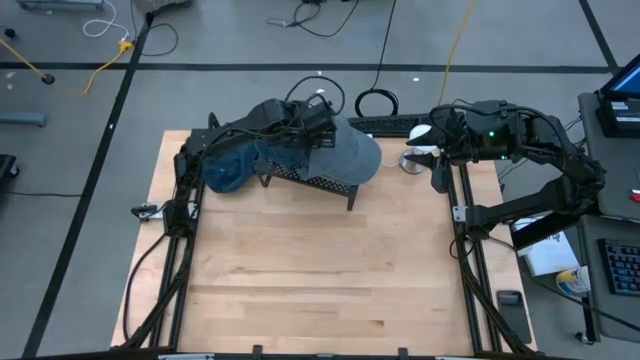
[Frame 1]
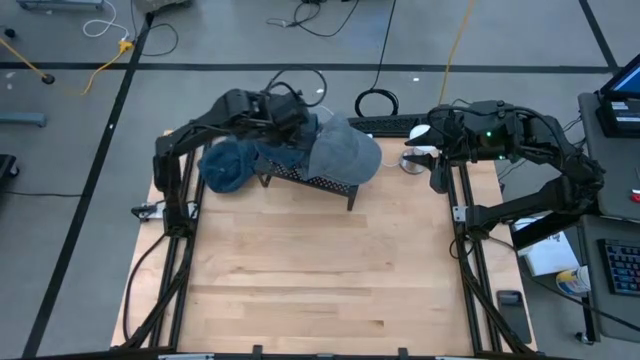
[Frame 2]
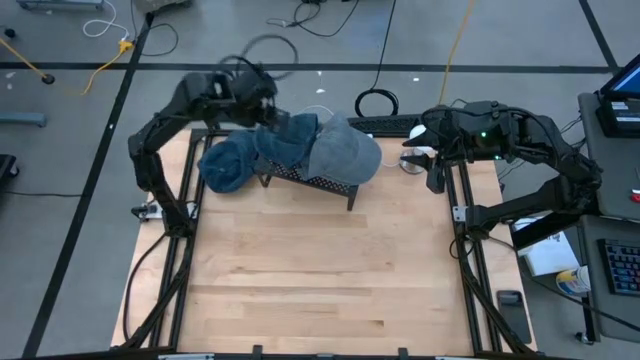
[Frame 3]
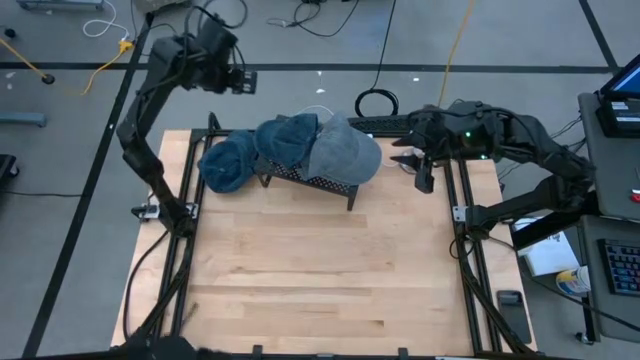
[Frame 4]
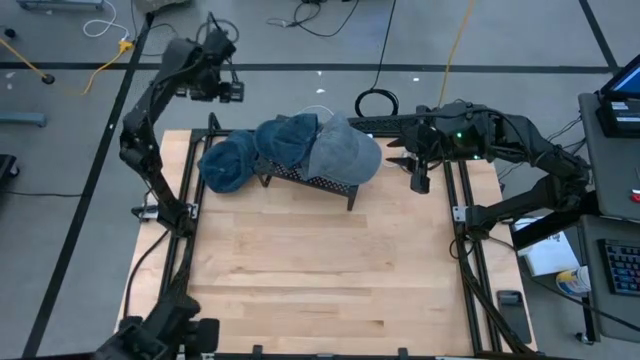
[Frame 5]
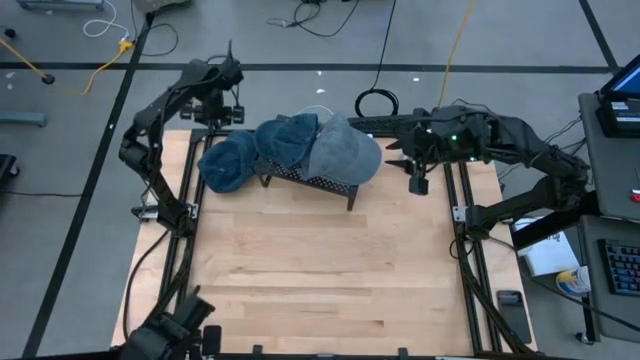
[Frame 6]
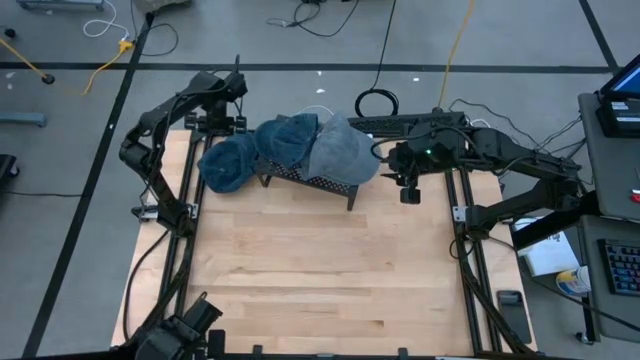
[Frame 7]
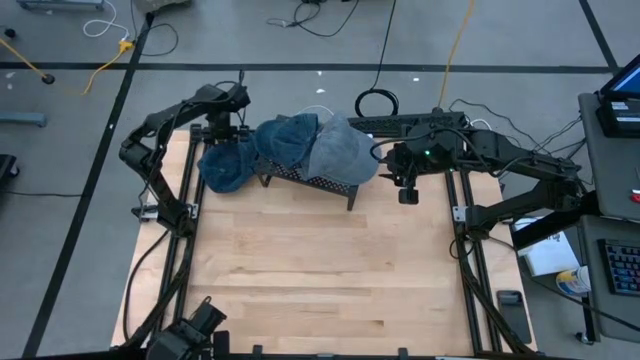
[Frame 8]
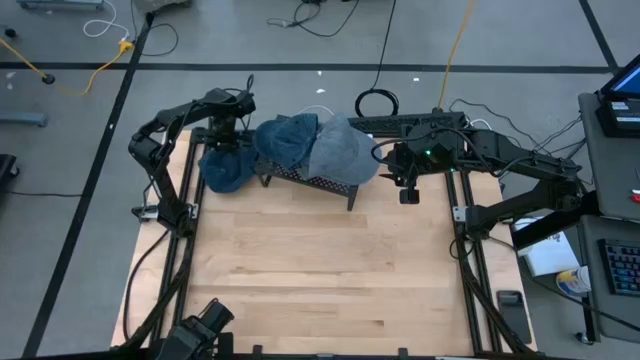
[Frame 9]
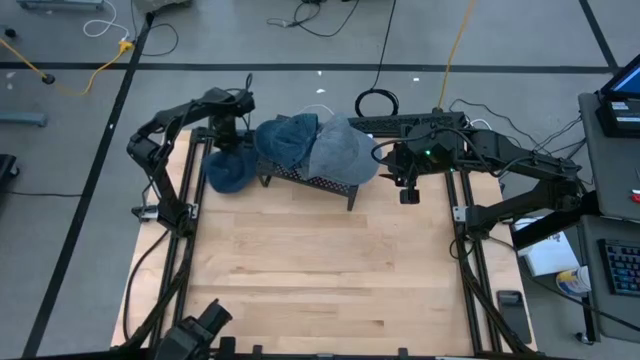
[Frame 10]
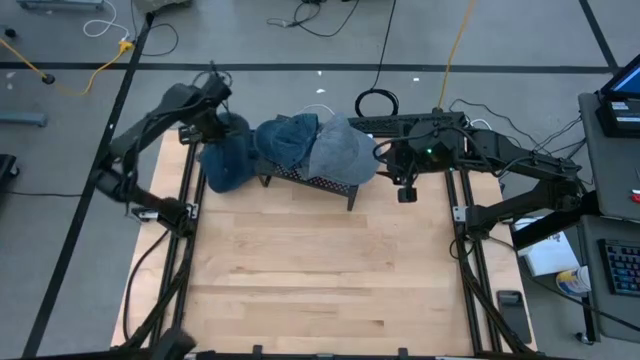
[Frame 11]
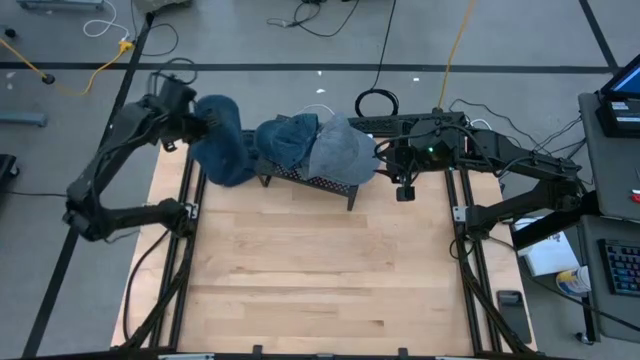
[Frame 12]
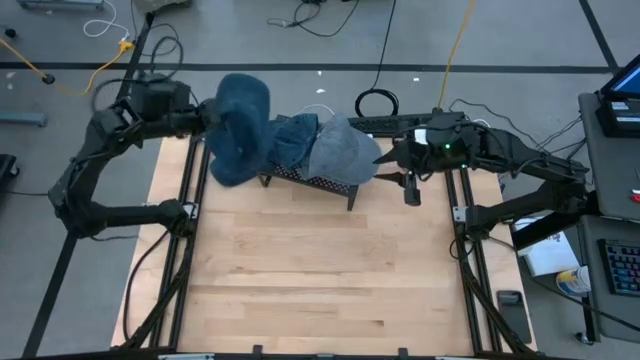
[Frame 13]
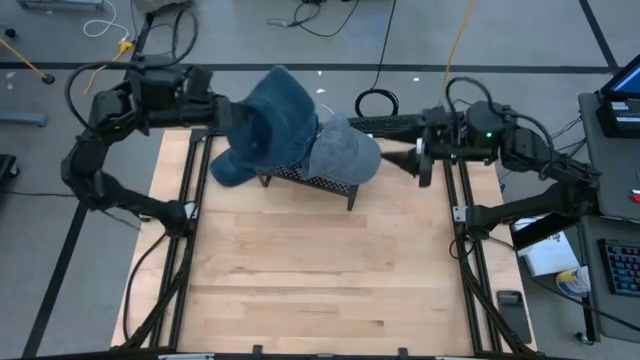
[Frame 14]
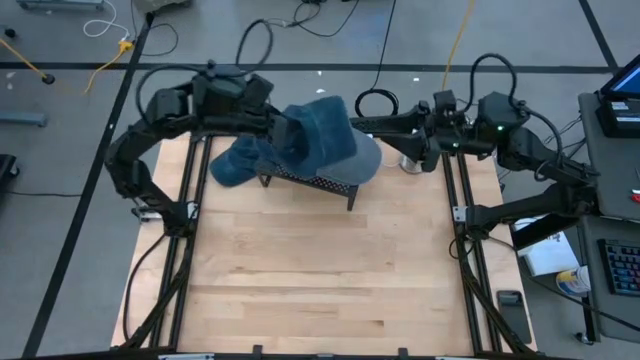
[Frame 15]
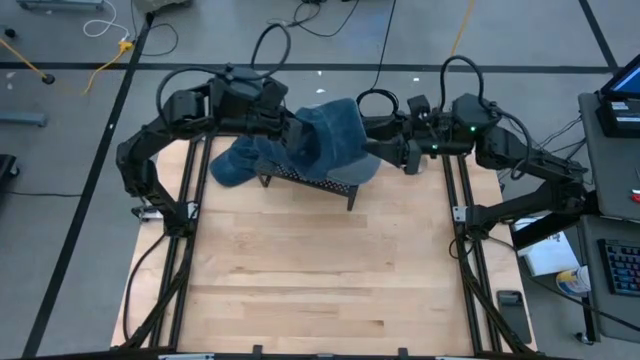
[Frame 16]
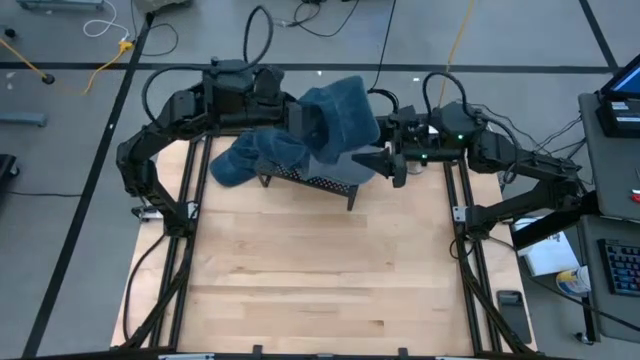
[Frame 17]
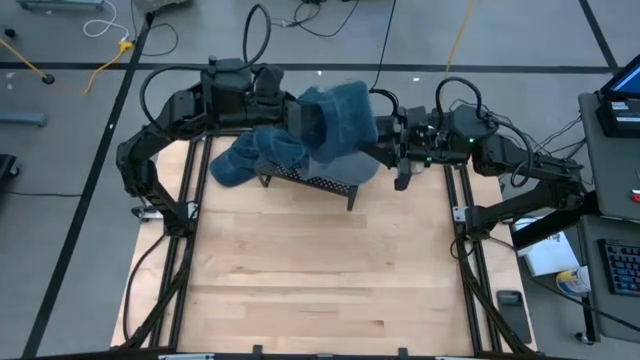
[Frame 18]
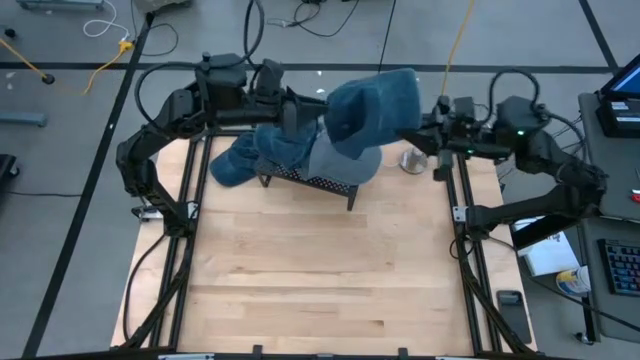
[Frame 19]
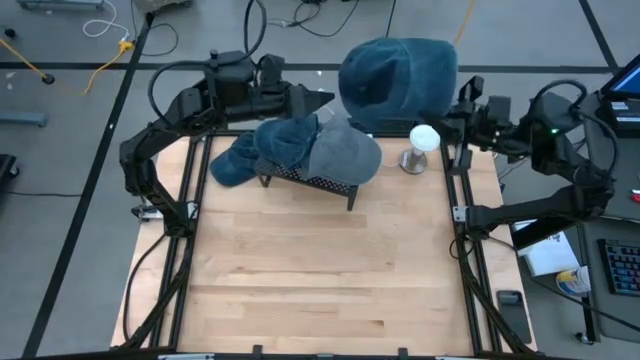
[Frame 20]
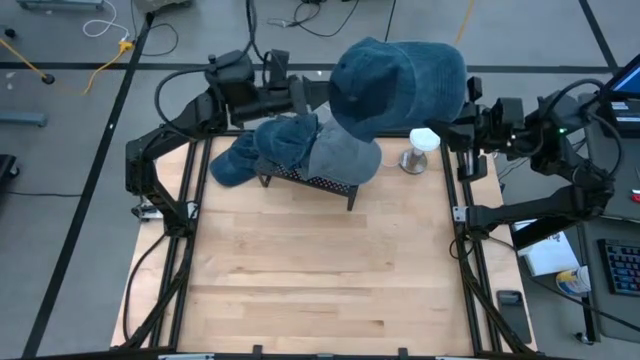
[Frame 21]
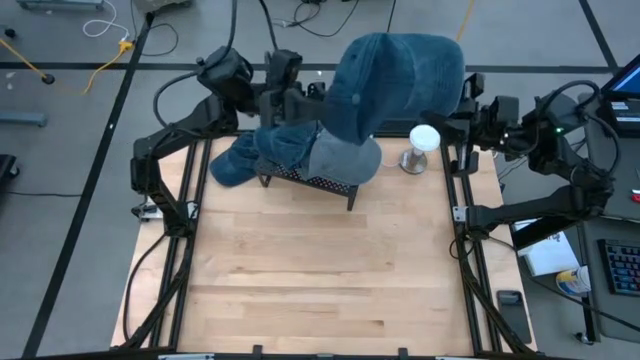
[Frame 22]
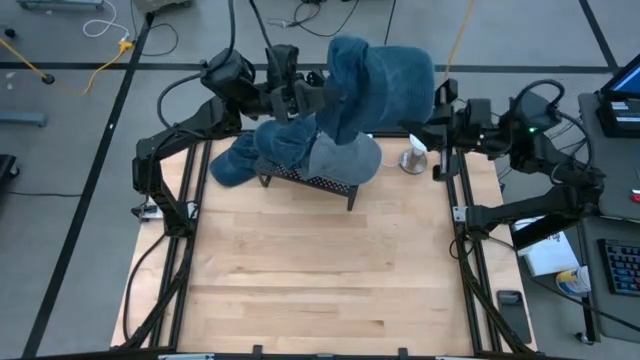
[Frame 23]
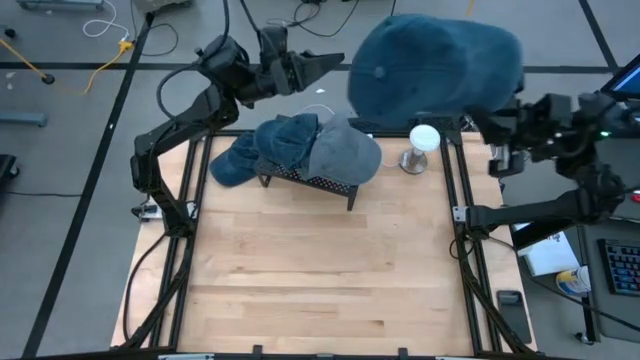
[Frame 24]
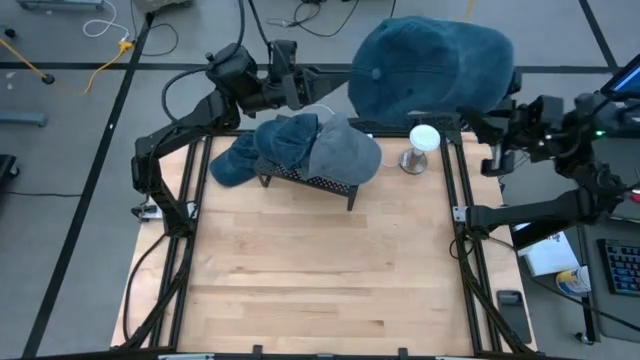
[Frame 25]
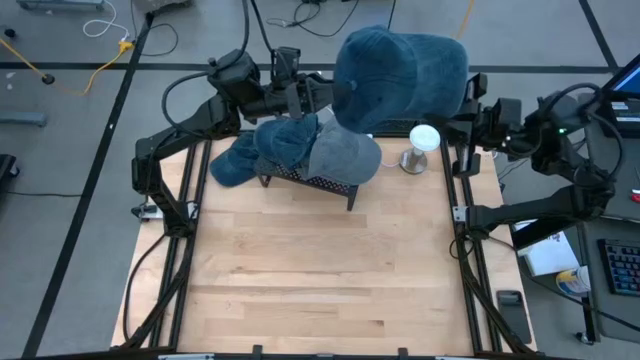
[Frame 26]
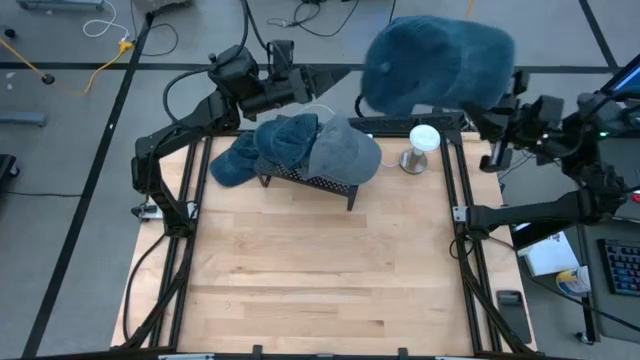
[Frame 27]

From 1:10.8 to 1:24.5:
Task: Pick & Place hat
Stack the blue cap on the blue cap on the shelf

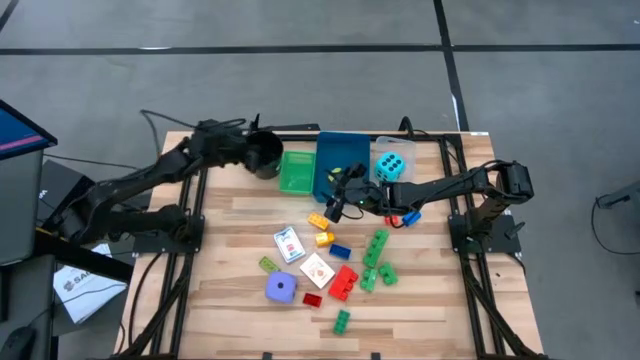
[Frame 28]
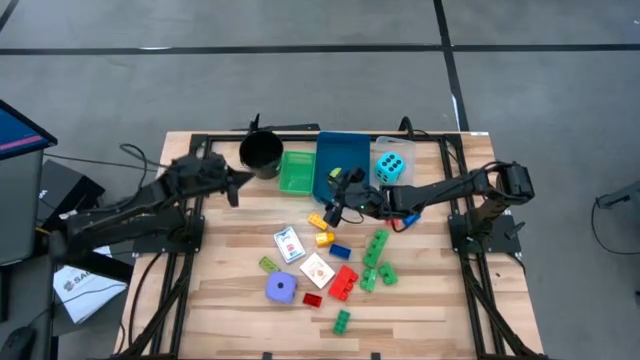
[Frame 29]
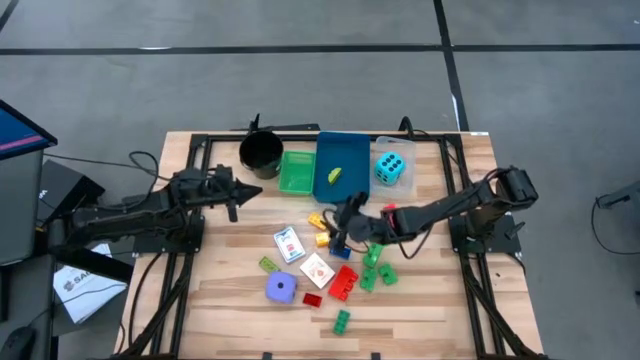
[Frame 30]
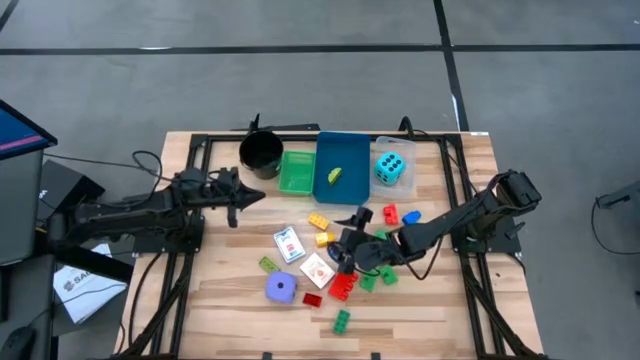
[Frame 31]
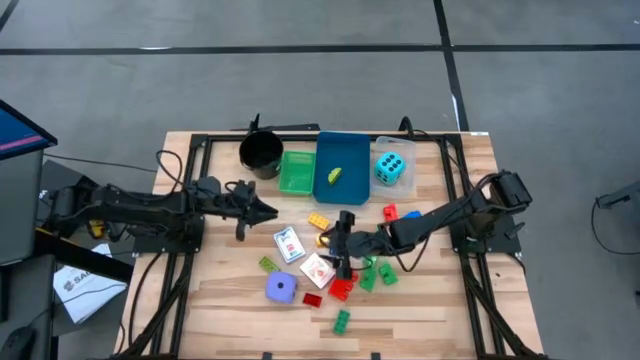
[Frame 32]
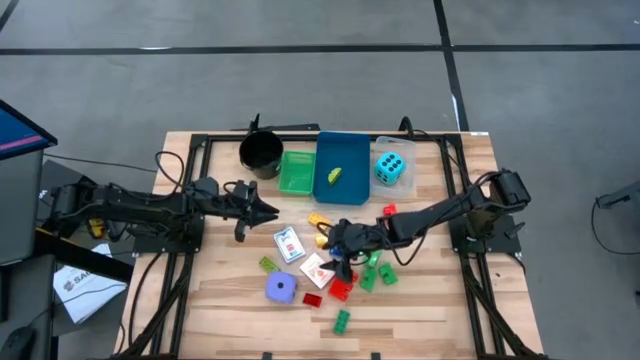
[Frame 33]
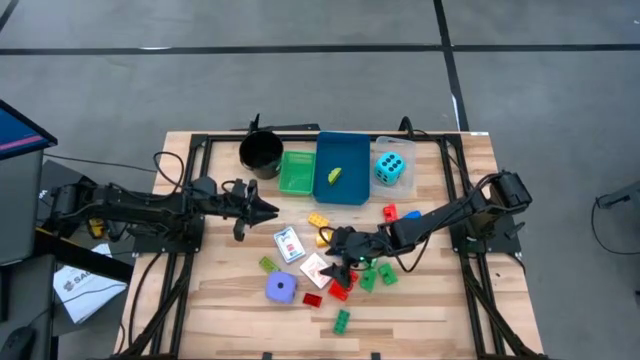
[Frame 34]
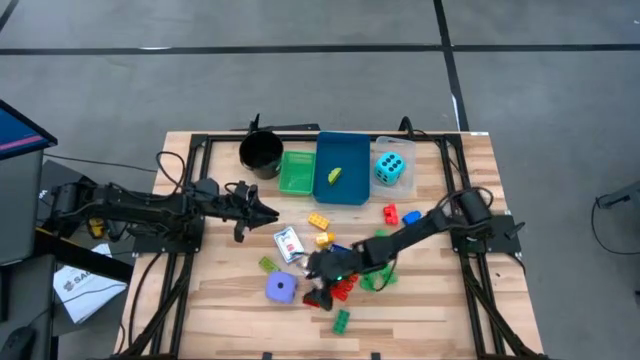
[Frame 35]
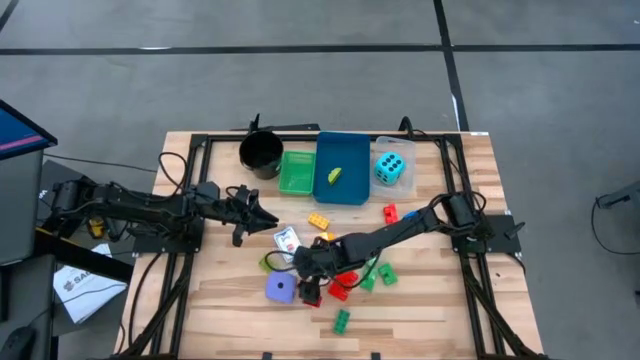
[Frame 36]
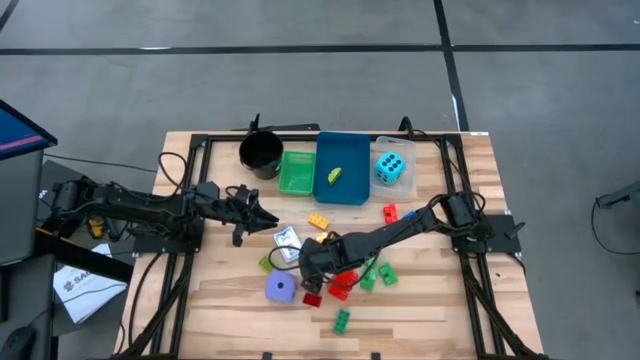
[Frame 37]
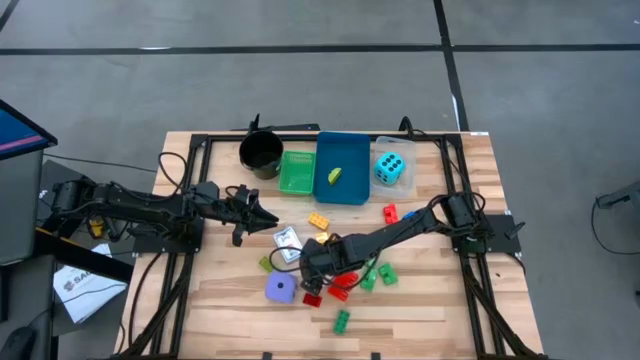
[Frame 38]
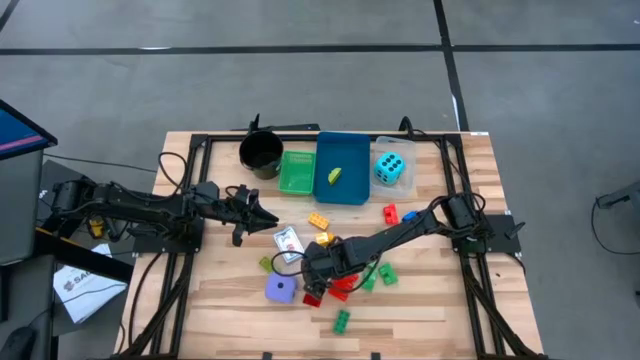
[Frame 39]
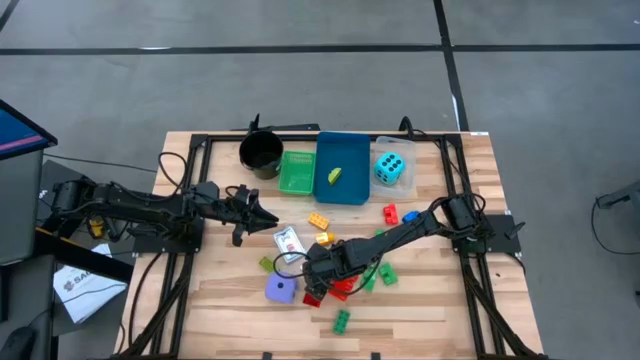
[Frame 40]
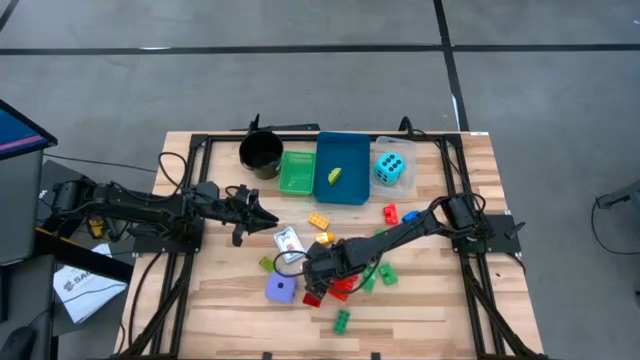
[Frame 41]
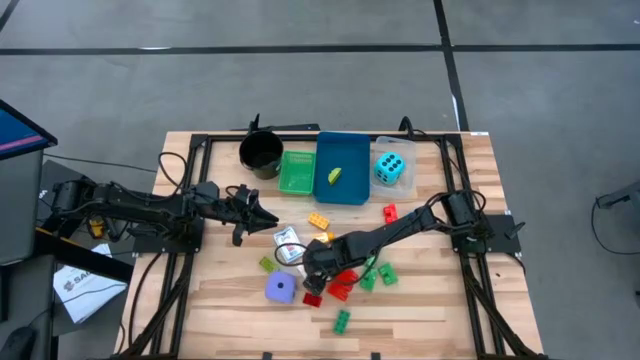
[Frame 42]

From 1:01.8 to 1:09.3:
Task: Pick & Place Toys
Adjust the deck of cards
